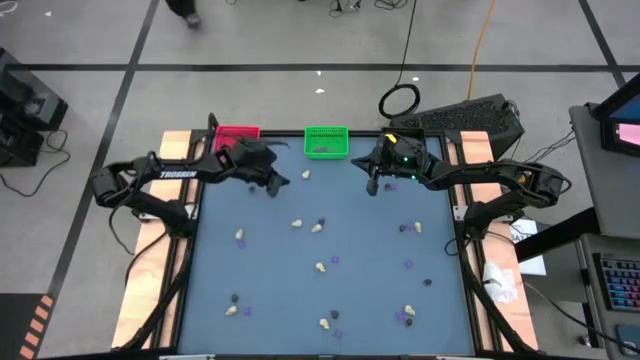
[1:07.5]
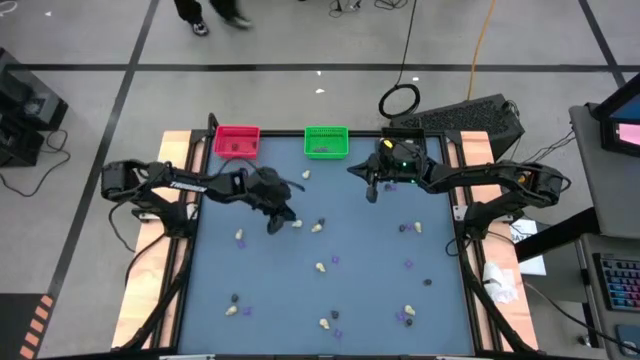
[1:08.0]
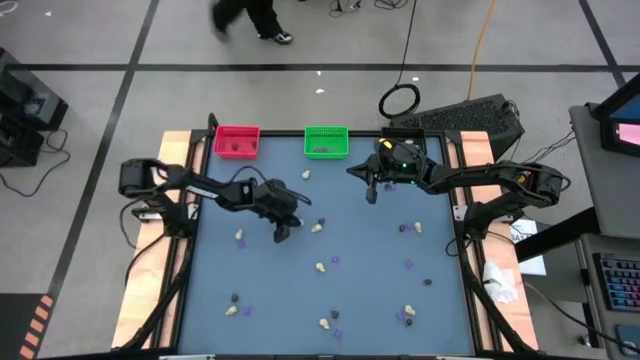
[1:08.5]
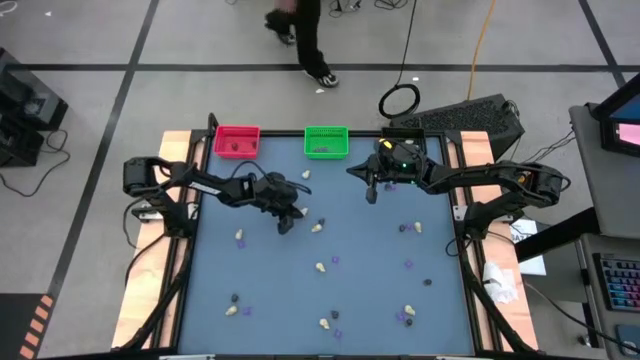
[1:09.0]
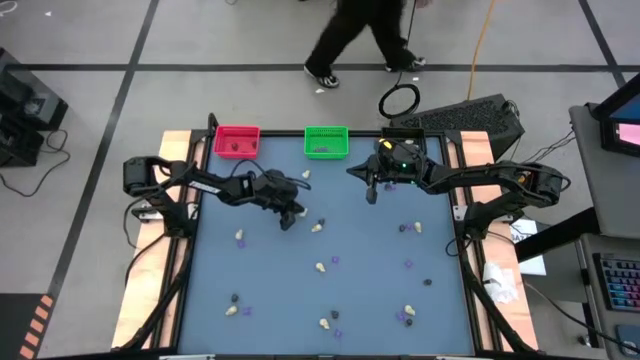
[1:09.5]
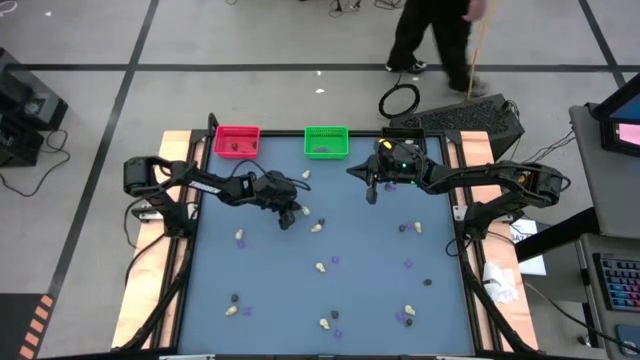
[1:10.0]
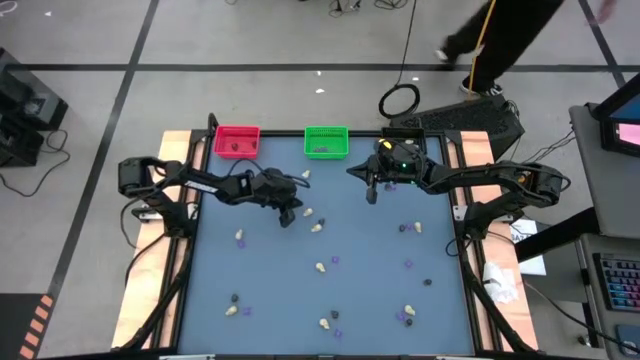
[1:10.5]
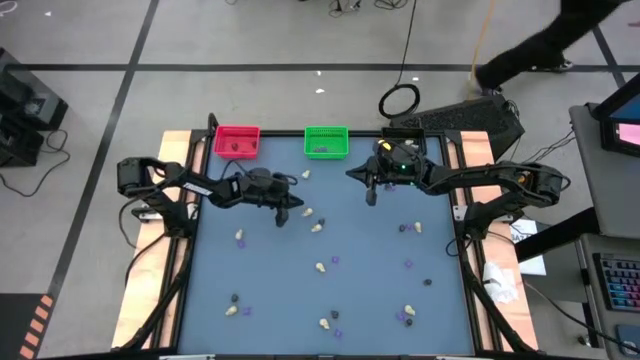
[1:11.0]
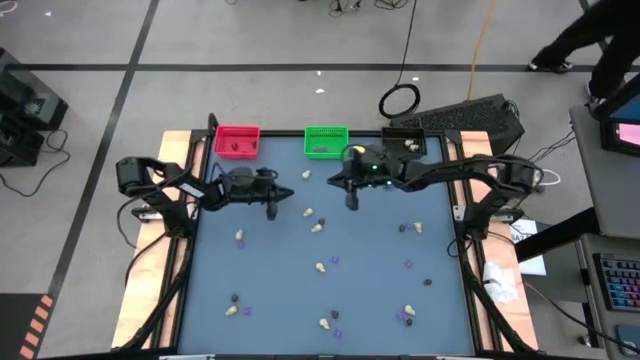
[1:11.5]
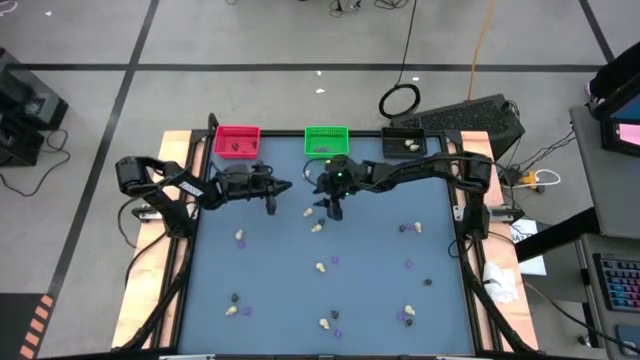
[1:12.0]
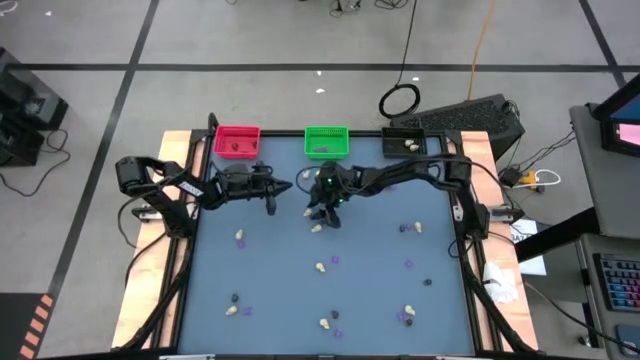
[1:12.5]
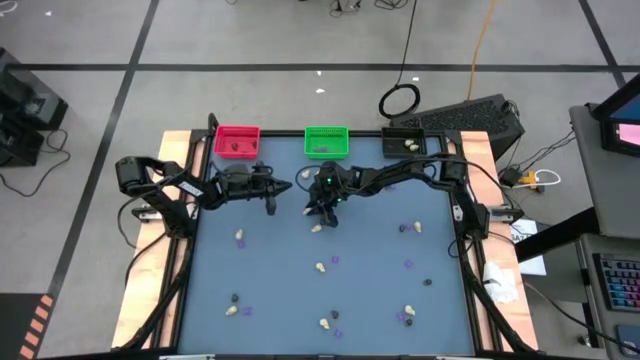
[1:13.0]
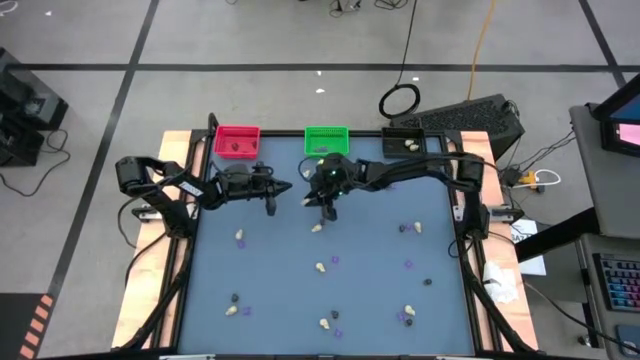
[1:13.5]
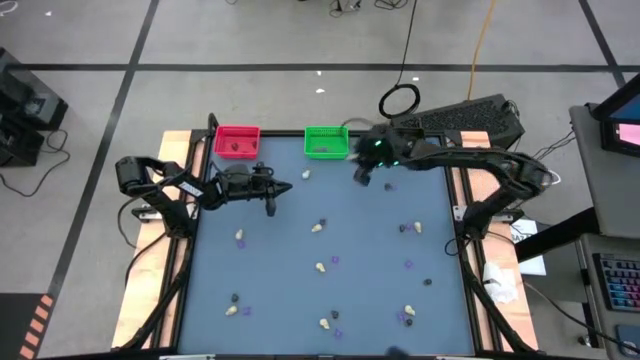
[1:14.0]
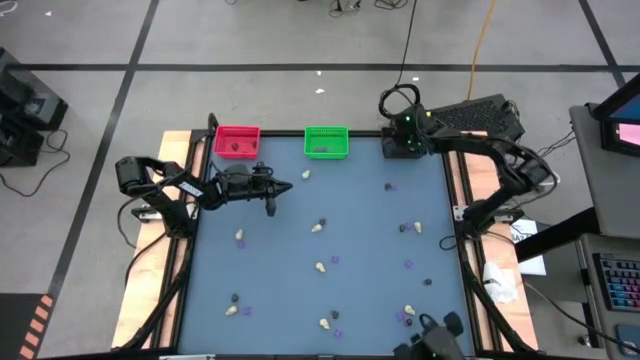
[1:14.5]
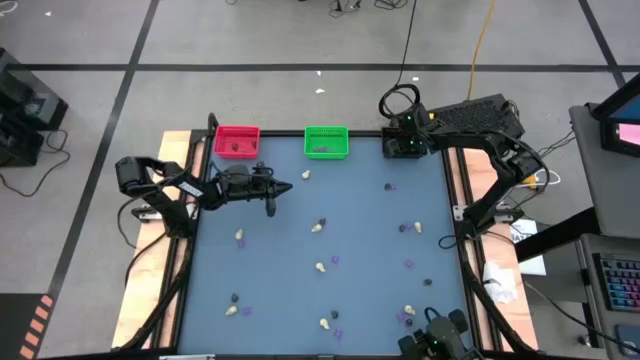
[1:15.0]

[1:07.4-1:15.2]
Task: Sort Halloween decoration
Put the white skull toy into the black bin

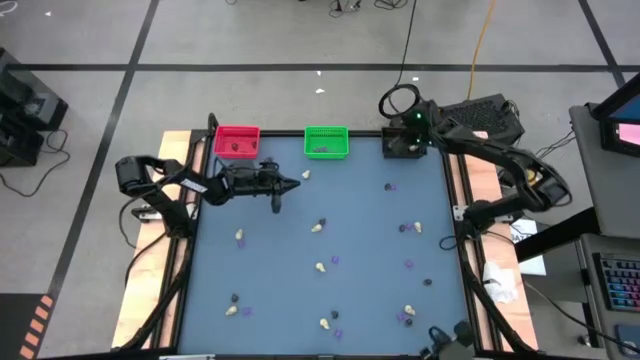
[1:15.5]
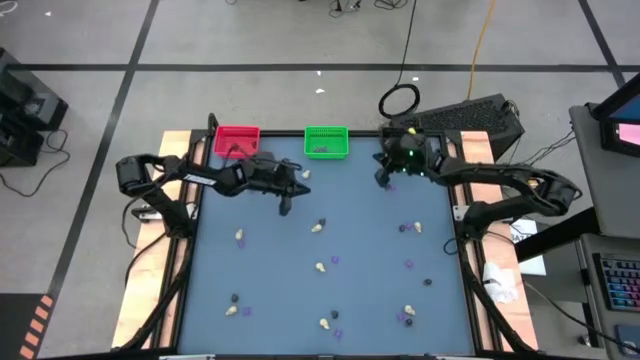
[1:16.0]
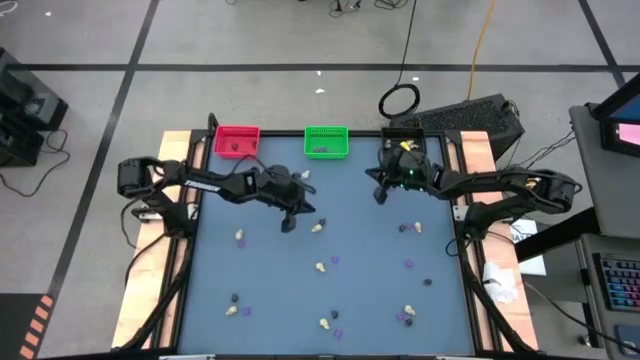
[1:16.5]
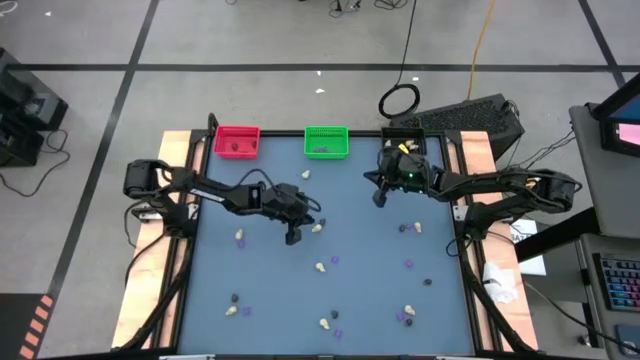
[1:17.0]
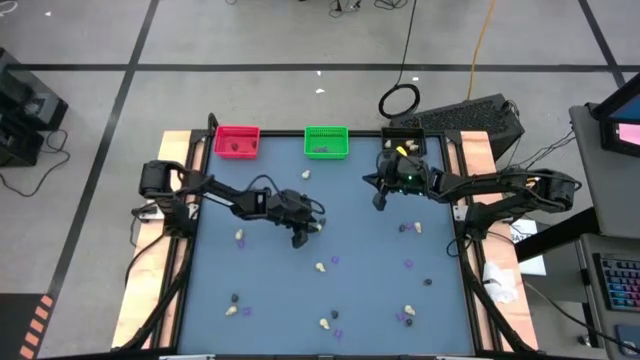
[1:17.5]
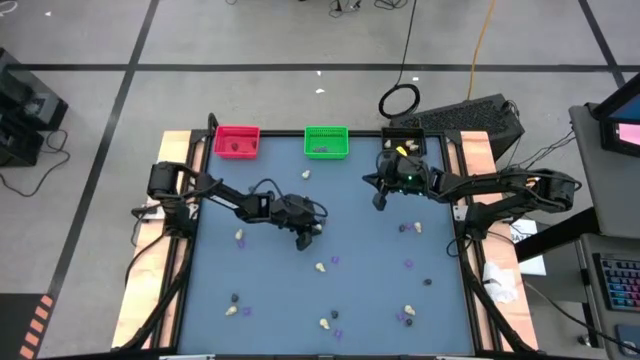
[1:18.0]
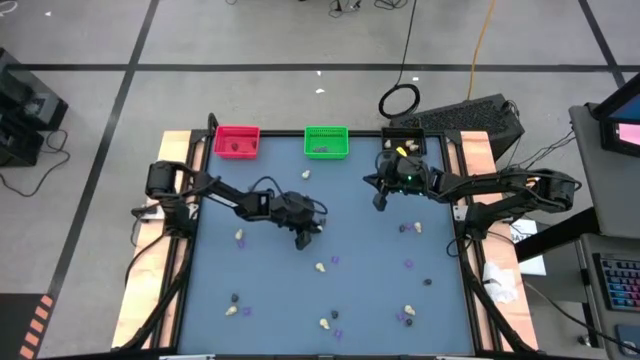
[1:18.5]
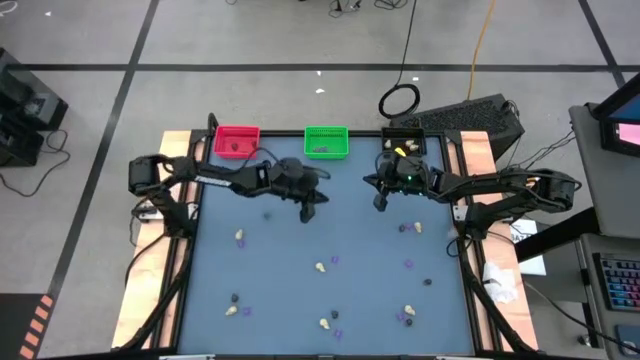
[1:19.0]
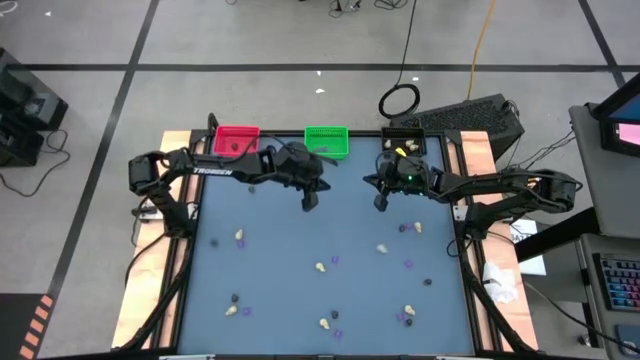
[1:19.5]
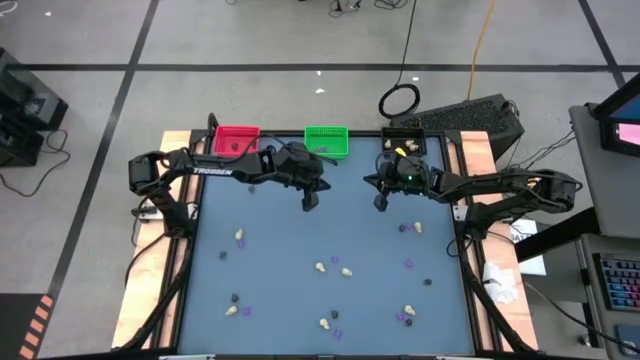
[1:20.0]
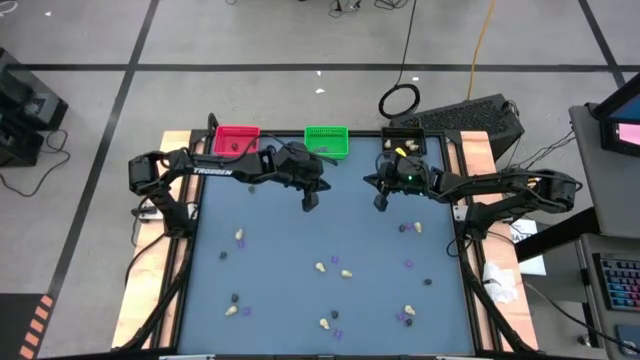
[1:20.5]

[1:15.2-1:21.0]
Put the white skull toy into the black bin

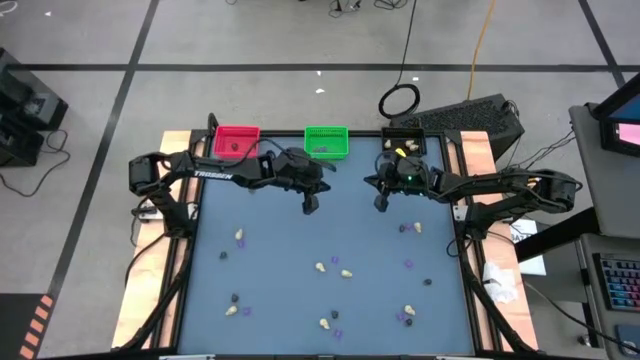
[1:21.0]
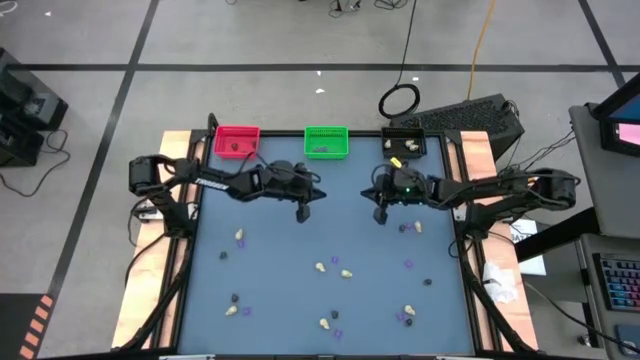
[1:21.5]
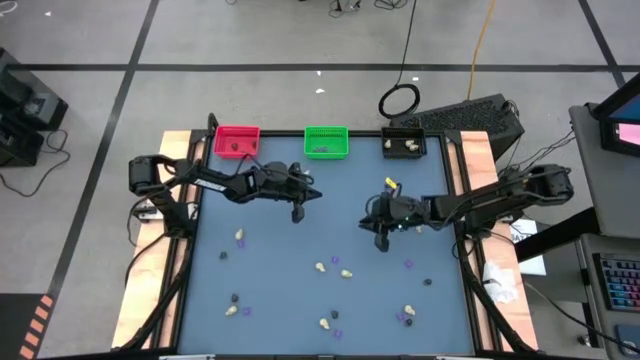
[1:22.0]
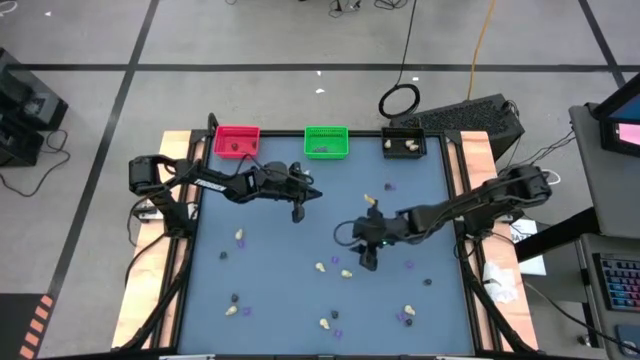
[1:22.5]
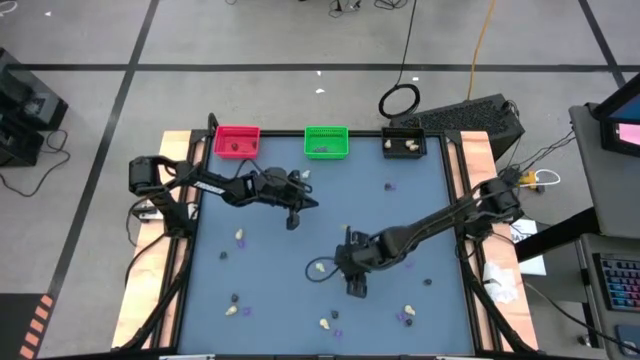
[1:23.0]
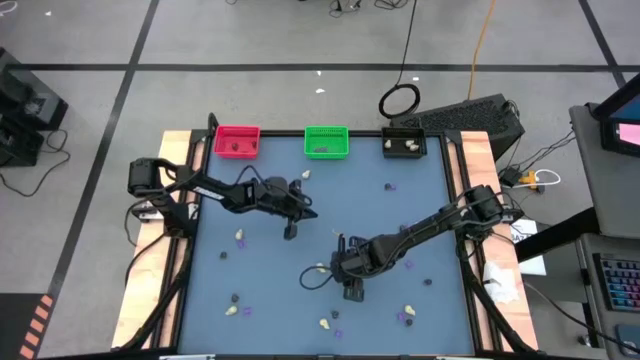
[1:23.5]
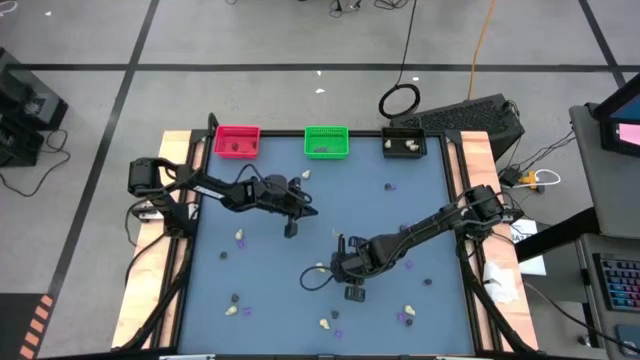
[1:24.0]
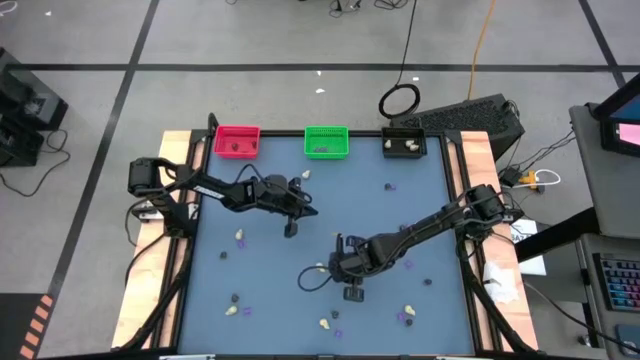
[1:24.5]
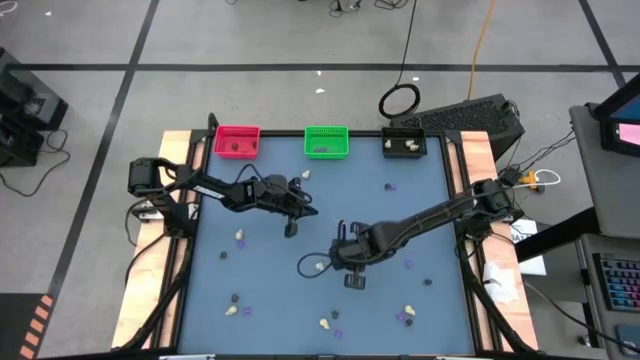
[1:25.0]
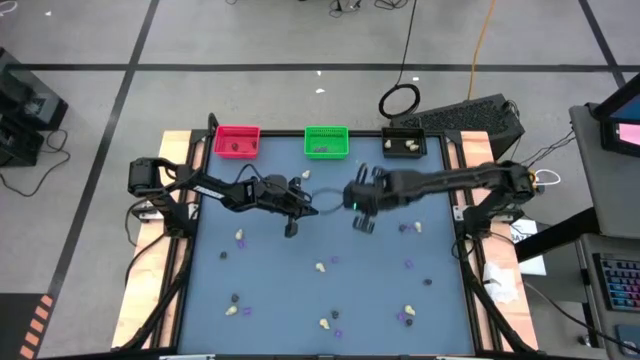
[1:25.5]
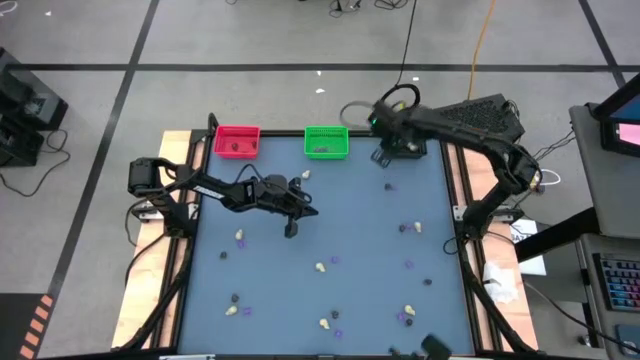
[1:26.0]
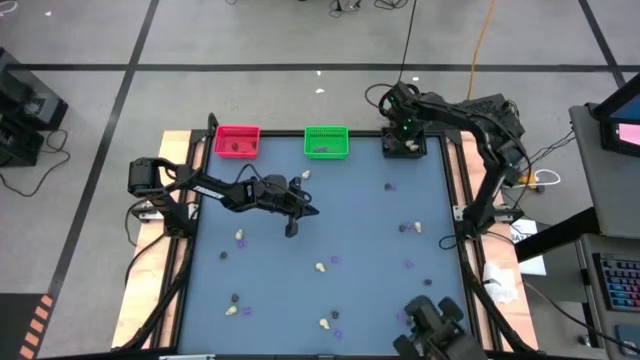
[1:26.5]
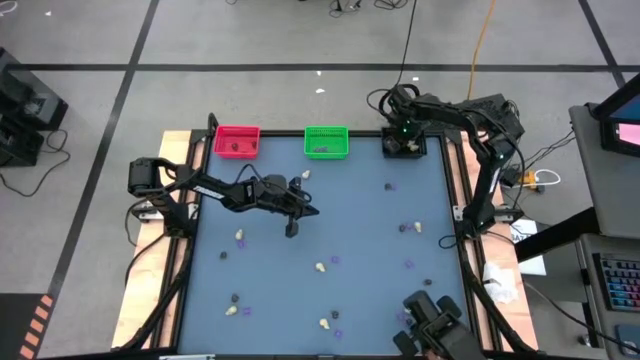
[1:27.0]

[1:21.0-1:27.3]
Put the white skull toy into the black bin

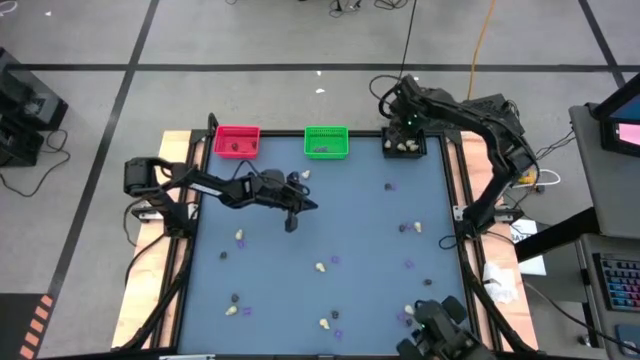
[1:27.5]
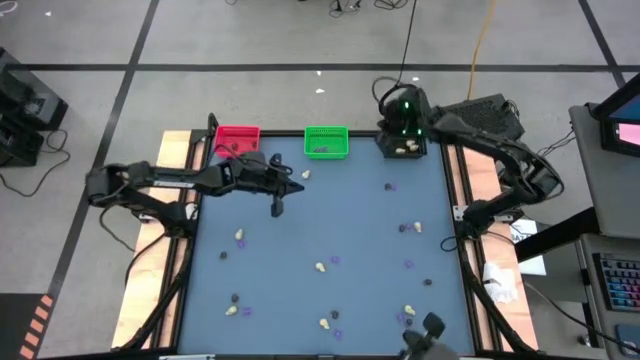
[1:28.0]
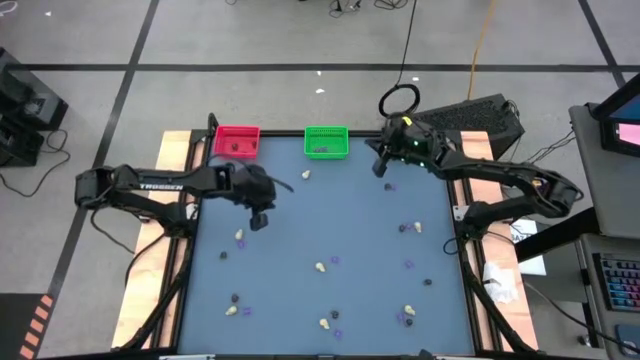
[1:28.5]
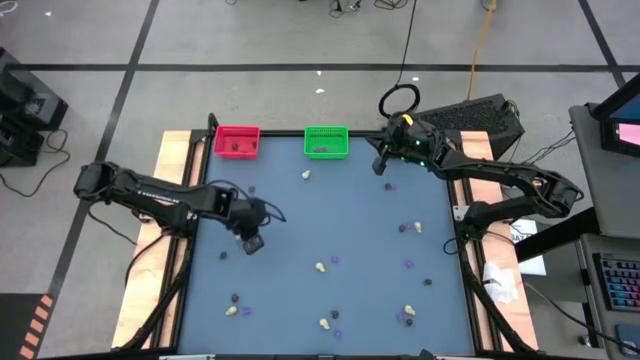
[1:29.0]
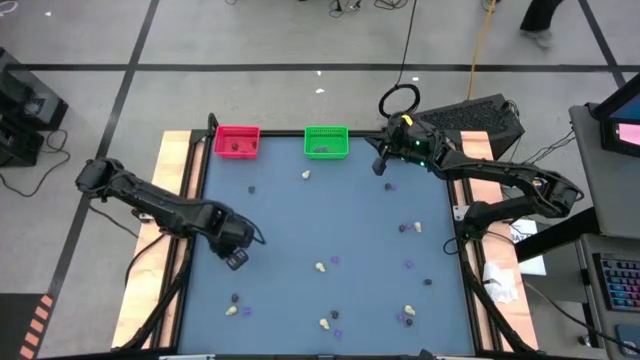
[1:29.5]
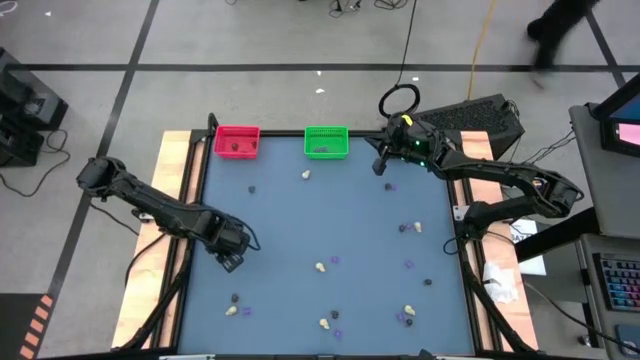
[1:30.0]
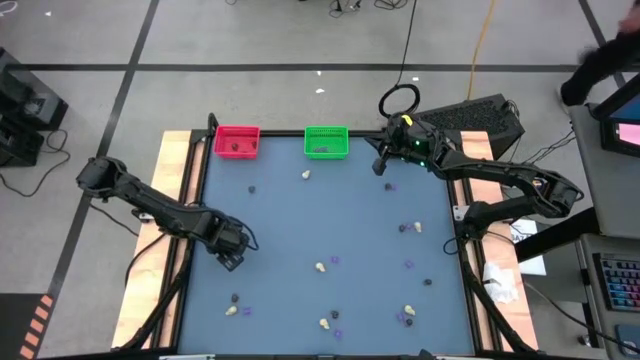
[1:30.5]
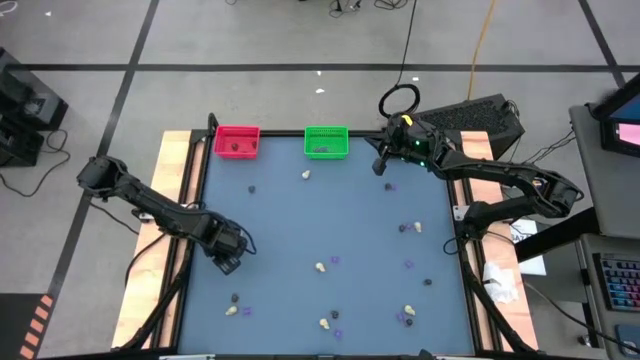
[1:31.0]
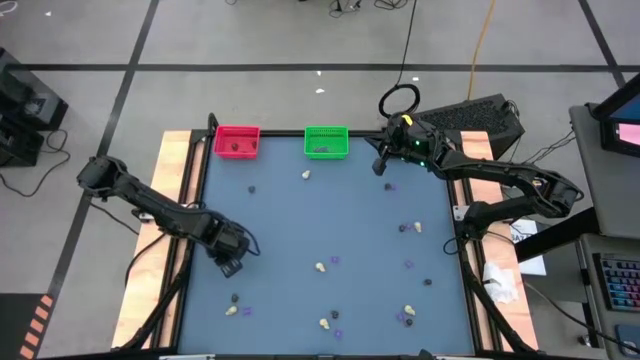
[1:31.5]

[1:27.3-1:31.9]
Put the black skull toy into the red bin
